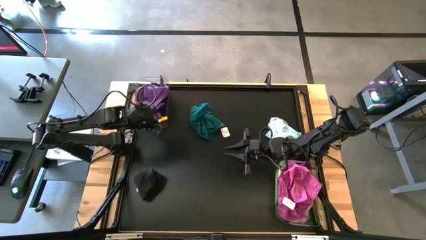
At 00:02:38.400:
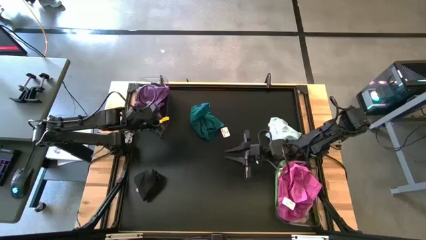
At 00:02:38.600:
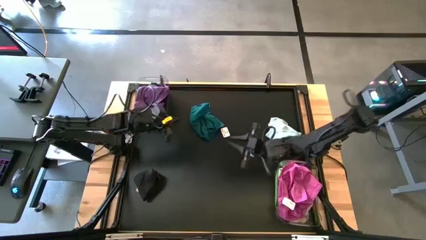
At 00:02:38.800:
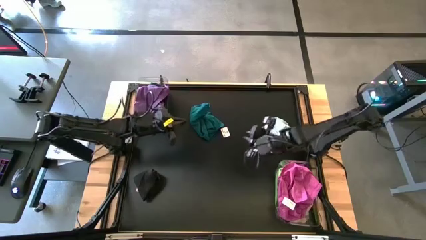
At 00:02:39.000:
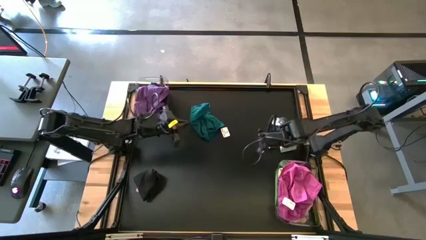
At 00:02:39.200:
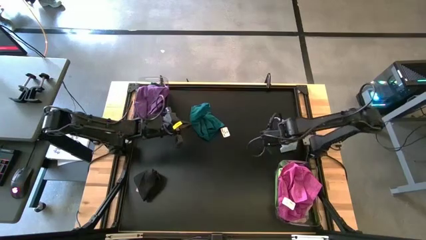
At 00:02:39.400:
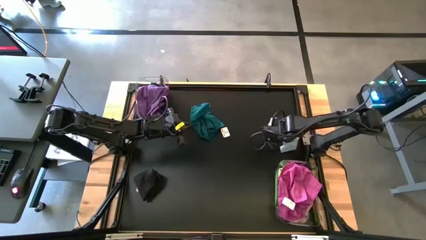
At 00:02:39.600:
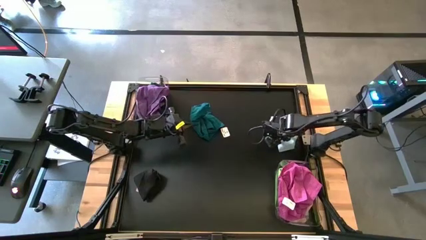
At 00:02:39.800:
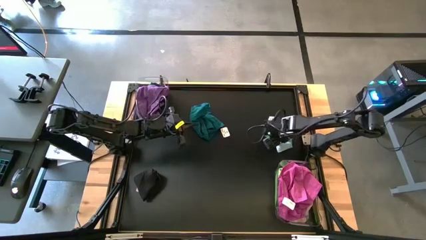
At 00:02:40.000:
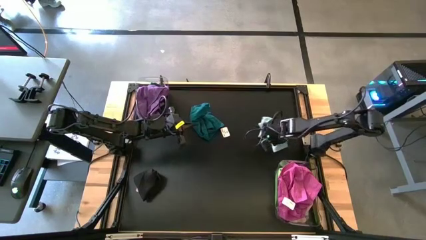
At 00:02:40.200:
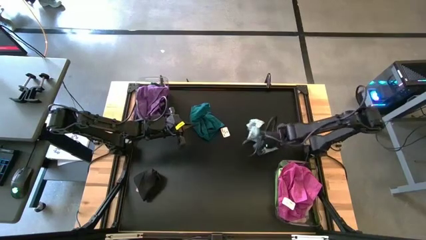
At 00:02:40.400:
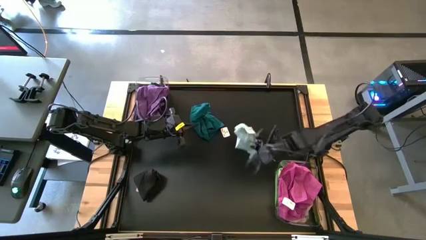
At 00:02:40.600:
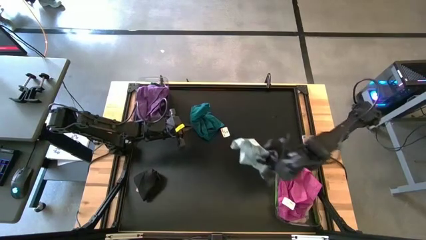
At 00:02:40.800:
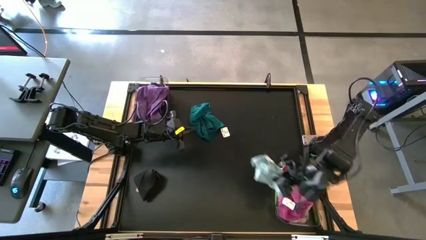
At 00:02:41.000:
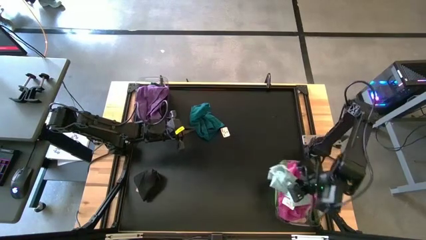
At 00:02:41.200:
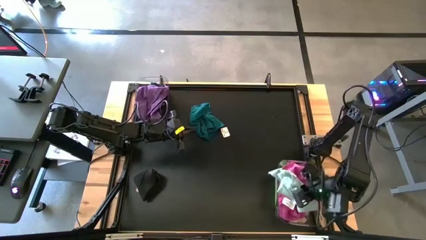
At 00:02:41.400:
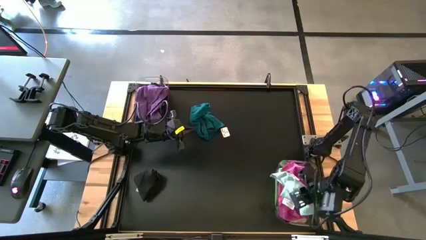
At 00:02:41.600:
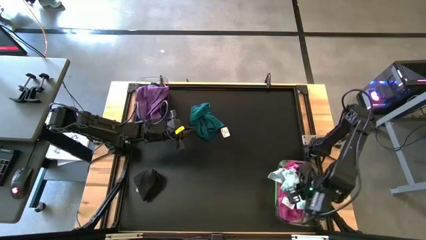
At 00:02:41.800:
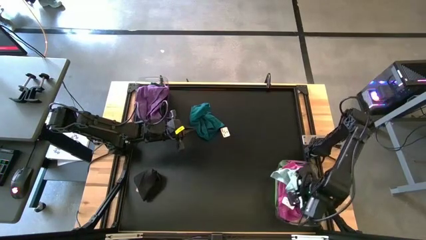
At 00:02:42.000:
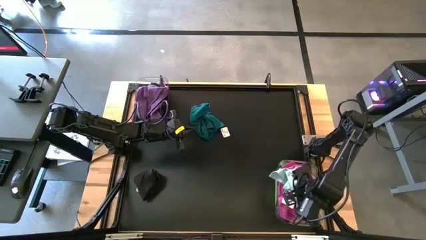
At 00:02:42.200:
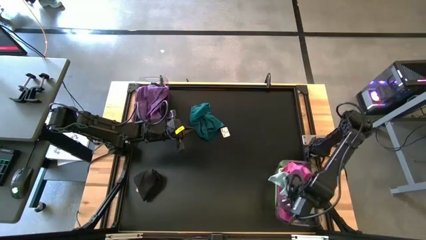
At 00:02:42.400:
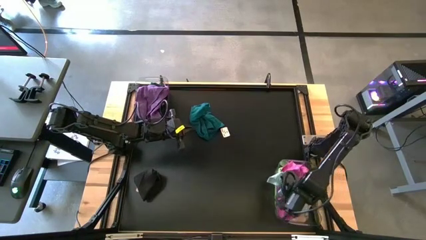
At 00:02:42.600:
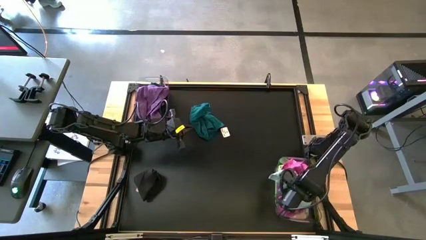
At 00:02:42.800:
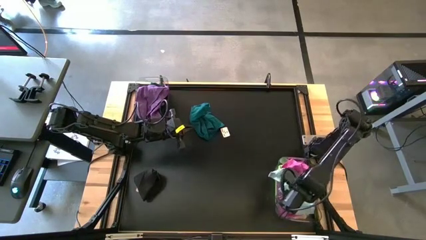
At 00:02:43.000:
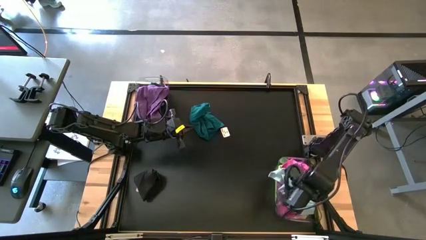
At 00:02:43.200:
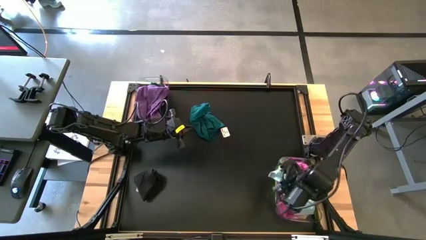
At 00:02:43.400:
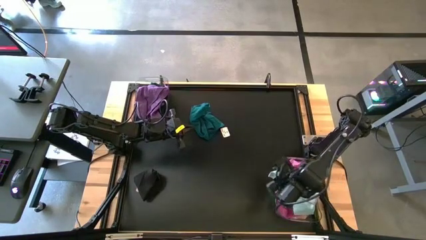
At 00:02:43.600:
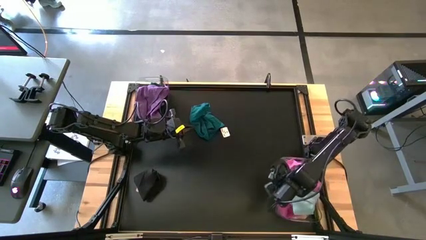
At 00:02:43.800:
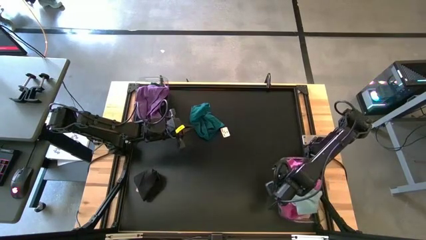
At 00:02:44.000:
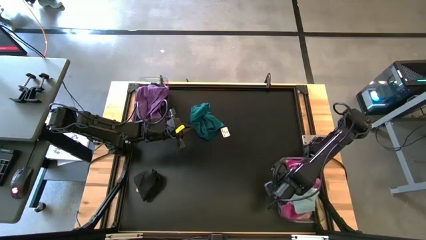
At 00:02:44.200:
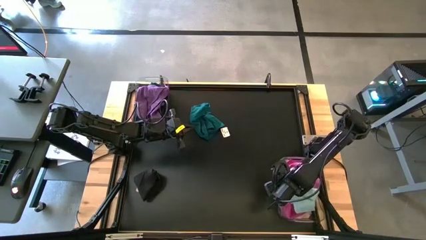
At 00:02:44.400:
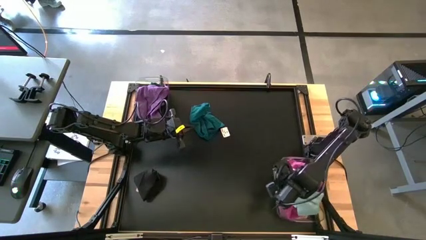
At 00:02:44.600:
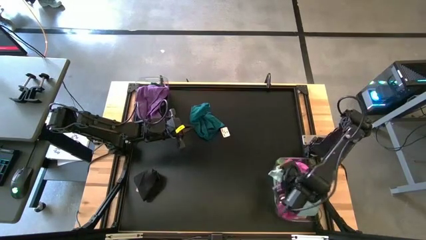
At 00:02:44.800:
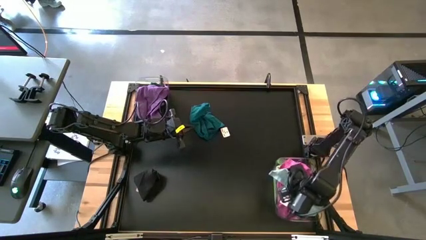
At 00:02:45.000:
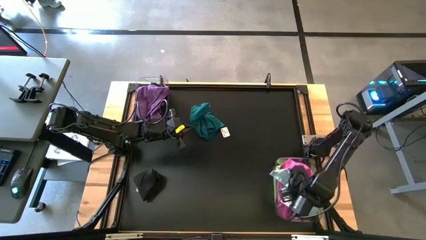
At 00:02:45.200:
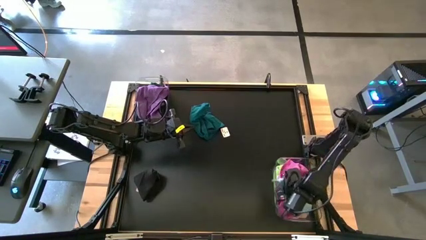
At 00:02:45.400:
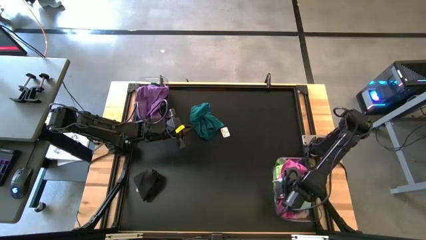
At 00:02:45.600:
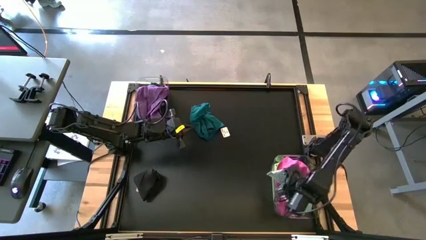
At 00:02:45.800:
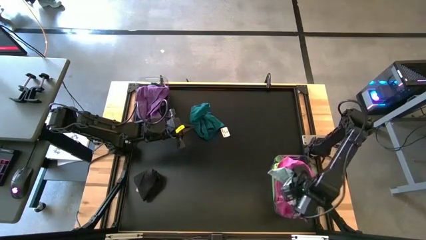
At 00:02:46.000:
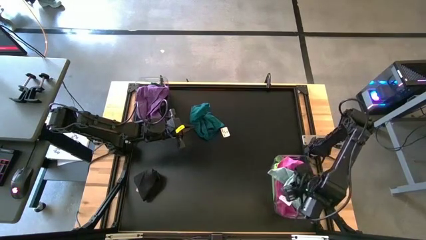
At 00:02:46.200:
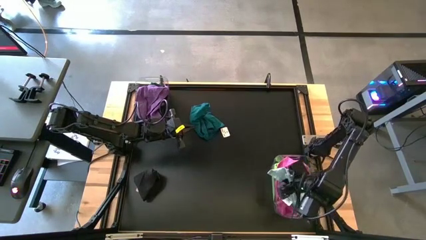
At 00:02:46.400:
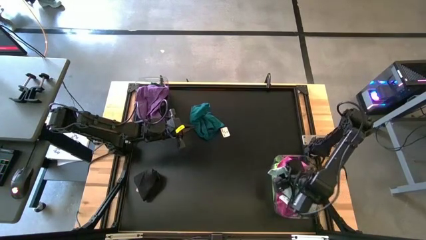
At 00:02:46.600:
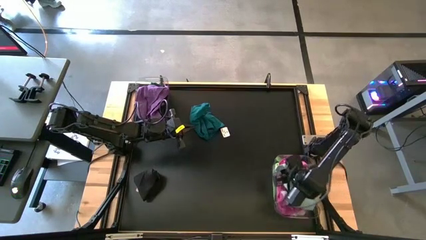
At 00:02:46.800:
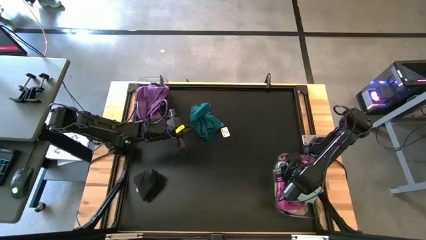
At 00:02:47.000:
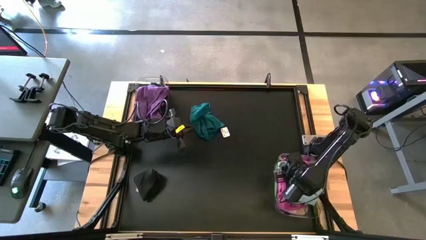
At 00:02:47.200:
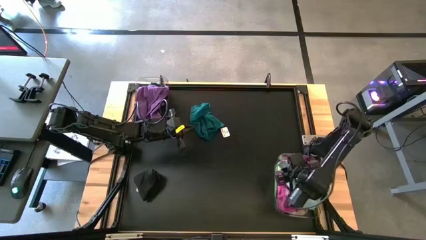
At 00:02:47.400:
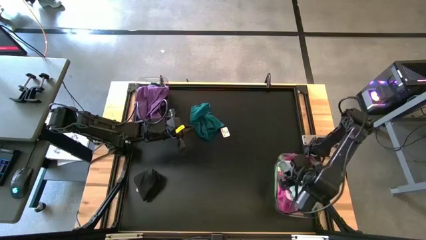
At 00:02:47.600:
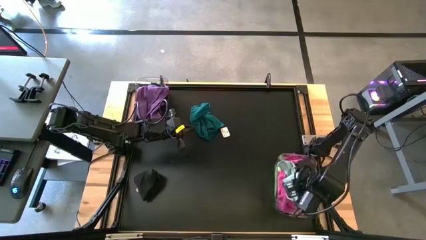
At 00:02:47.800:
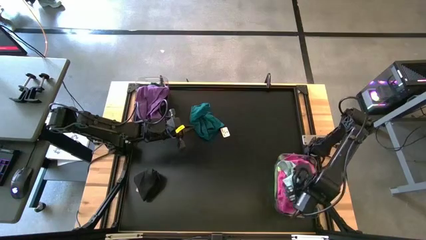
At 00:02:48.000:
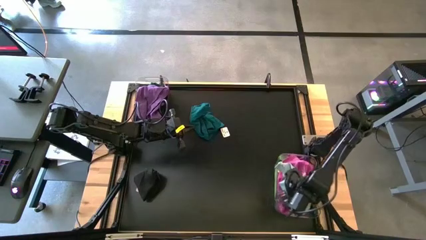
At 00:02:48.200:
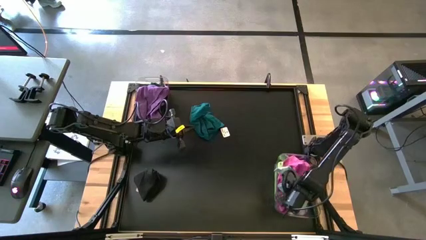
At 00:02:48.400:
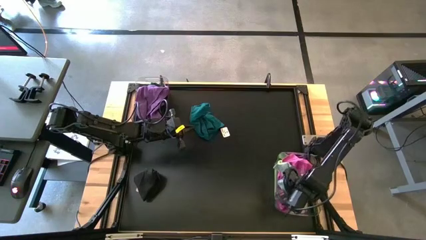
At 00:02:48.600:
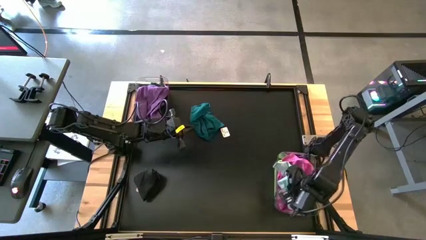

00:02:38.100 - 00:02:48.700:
Task: Sort towels by color in basket
Put the light blue towel into the bottom transparent bin

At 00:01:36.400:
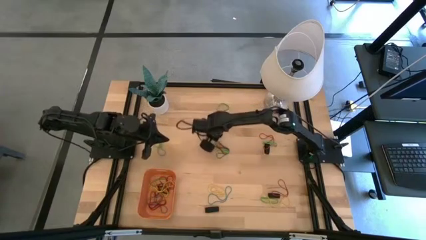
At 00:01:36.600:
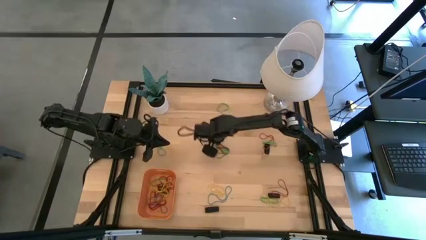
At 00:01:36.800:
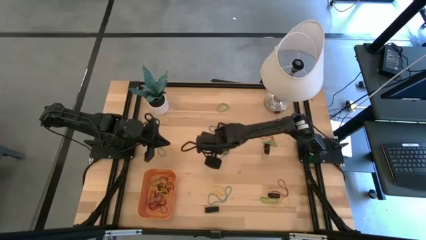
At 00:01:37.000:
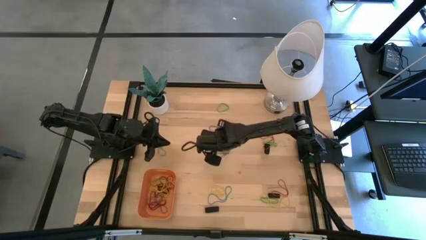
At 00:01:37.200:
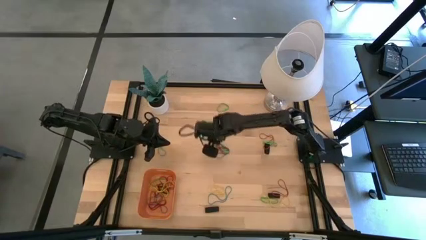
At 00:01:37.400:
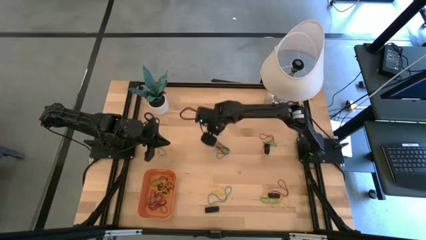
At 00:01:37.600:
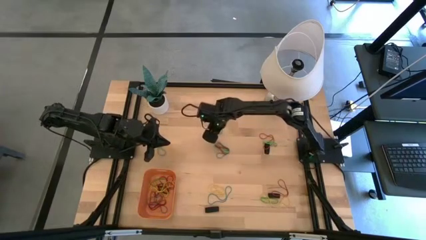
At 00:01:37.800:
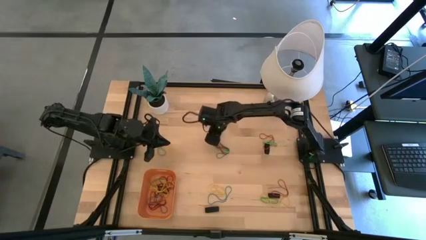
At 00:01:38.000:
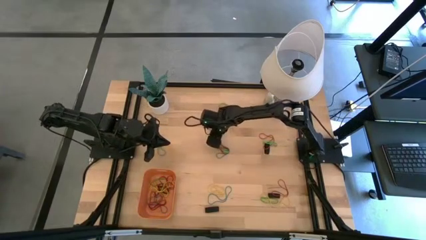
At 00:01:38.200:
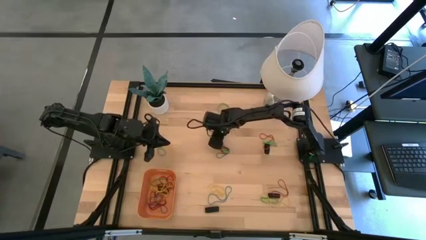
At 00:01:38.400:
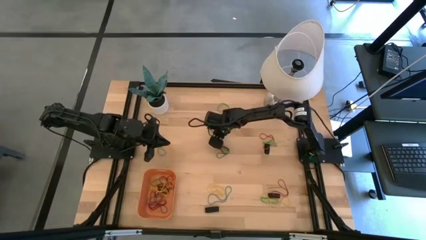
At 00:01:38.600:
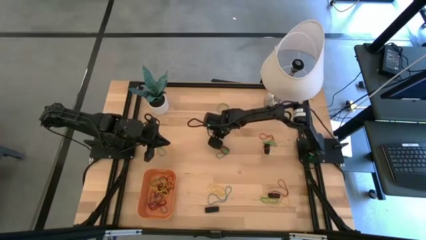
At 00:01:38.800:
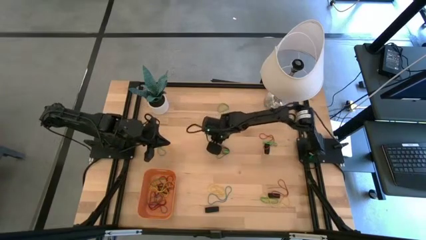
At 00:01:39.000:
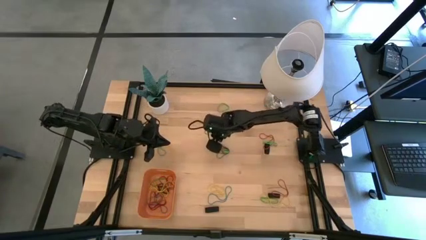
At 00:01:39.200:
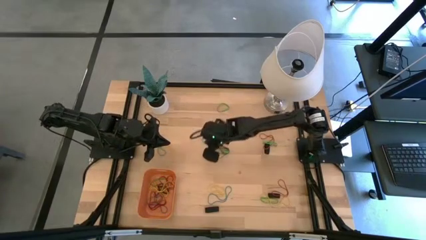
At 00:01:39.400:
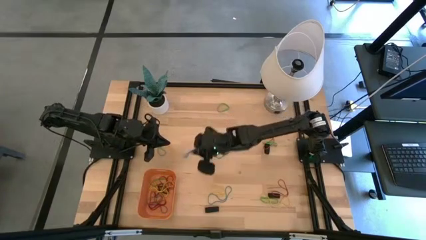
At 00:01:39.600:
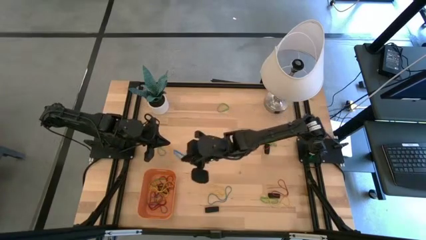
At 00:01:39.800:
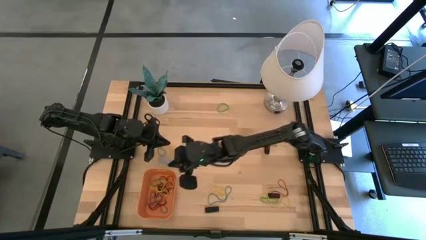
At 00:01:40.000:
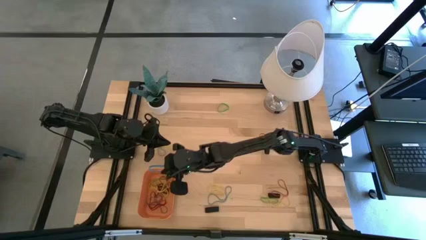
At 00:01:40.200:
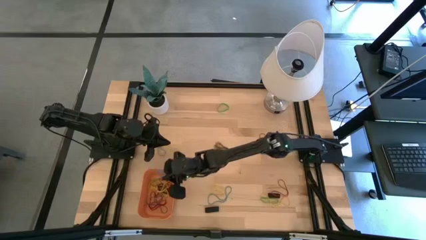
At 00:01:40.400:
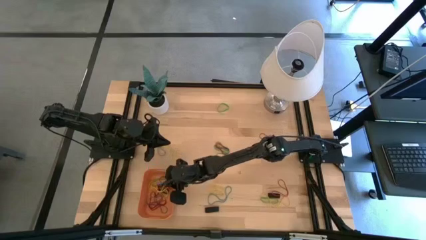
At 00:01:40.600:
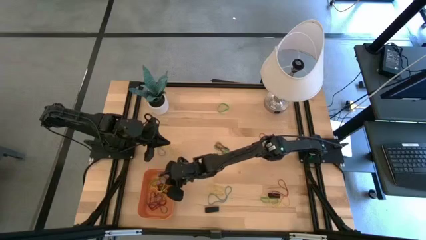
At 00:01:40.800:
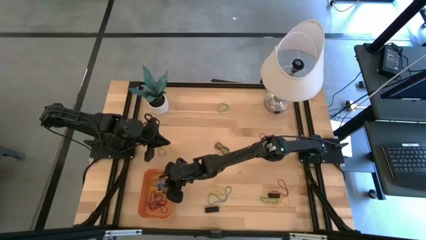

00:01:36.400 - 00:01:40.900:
Task: Pick and place rubber bands into bin
Put the blue rubber band into the orange bin
